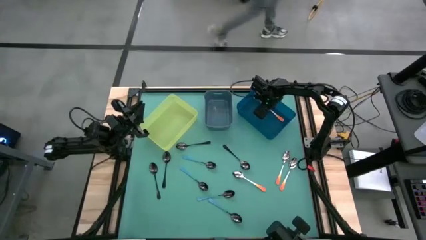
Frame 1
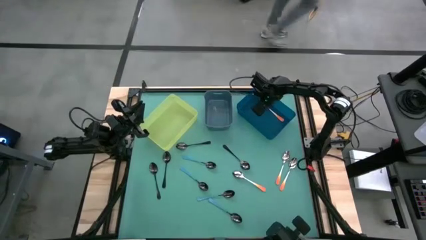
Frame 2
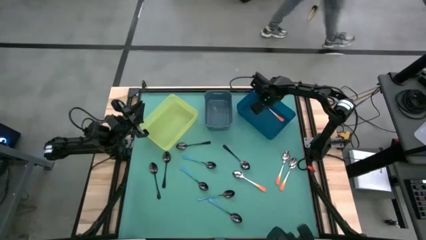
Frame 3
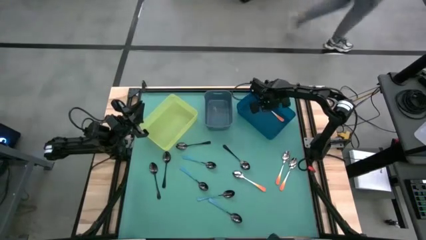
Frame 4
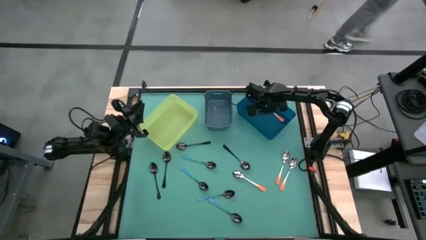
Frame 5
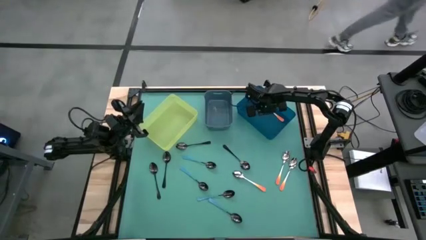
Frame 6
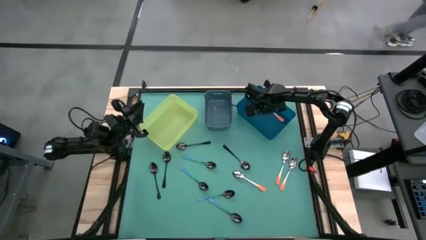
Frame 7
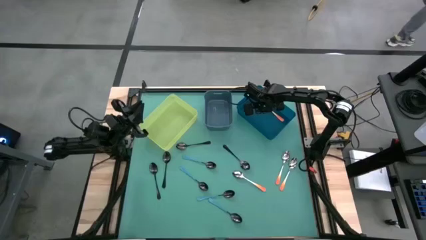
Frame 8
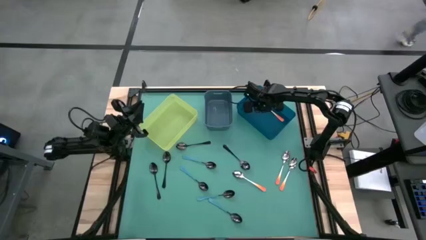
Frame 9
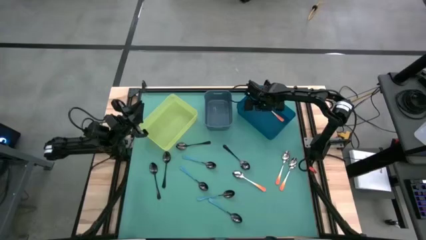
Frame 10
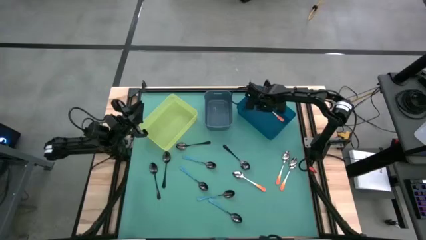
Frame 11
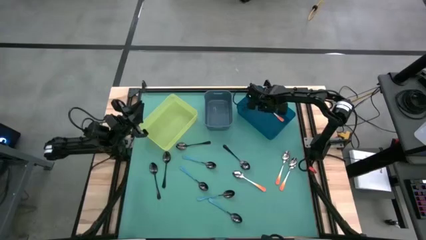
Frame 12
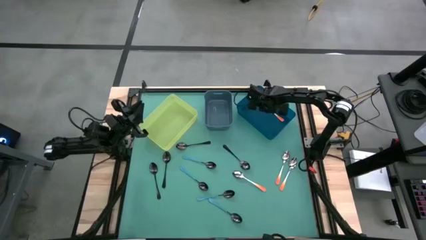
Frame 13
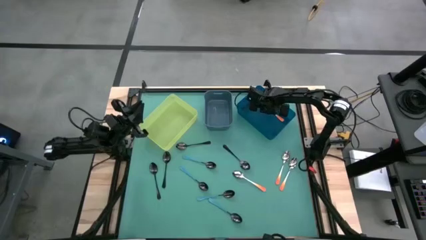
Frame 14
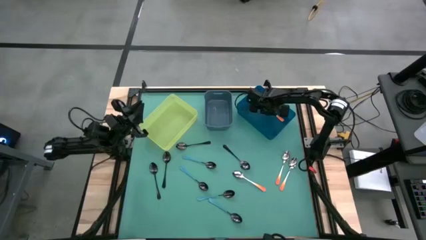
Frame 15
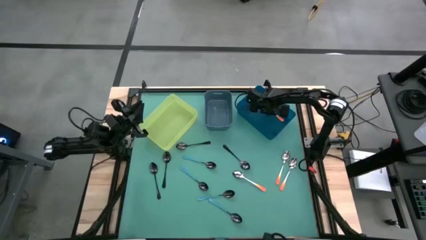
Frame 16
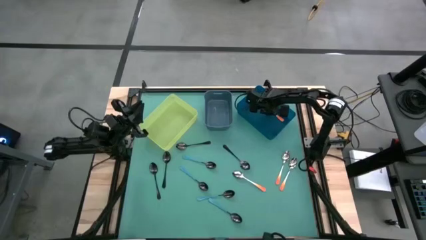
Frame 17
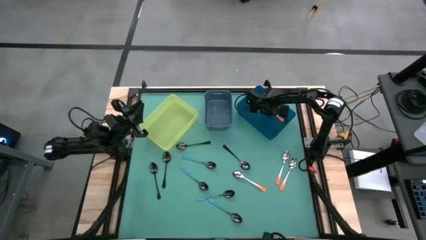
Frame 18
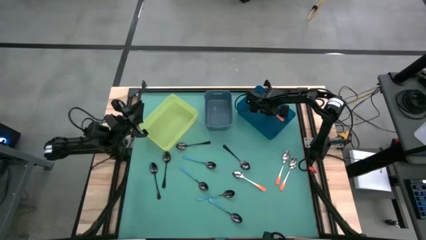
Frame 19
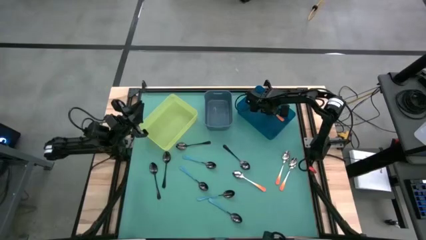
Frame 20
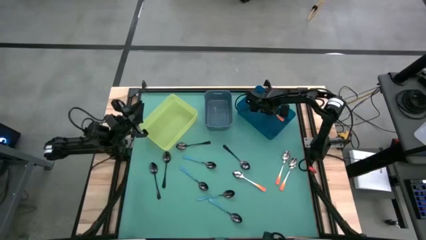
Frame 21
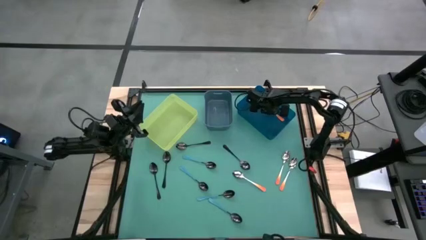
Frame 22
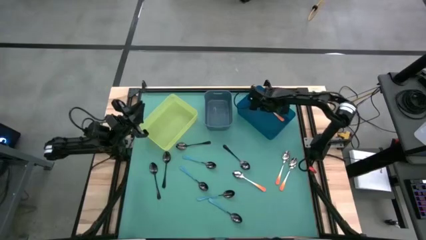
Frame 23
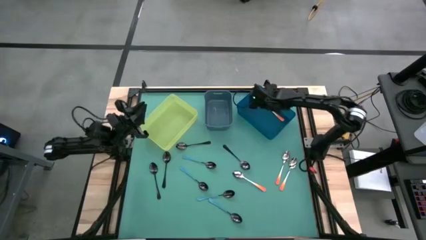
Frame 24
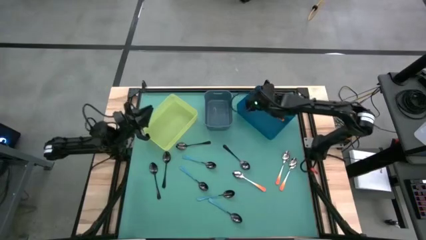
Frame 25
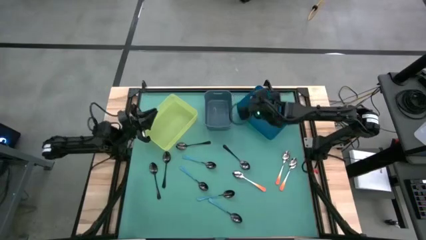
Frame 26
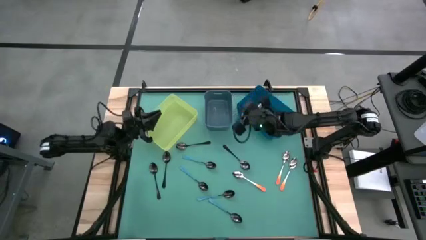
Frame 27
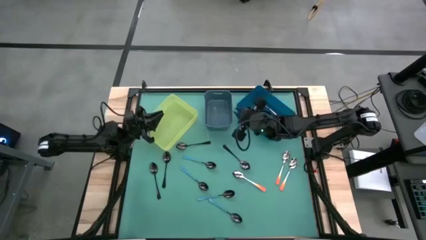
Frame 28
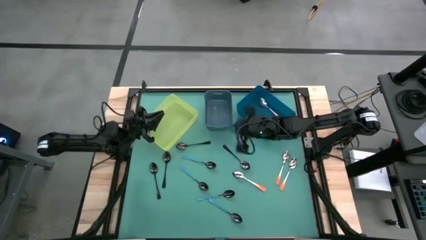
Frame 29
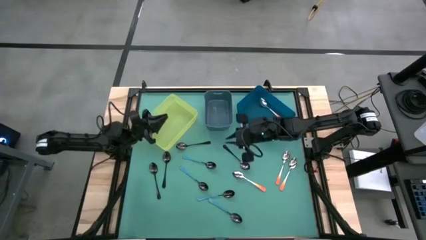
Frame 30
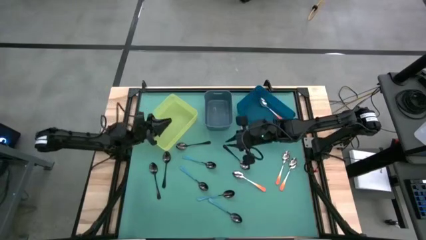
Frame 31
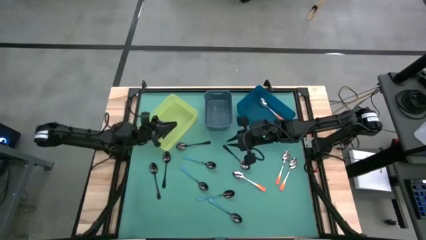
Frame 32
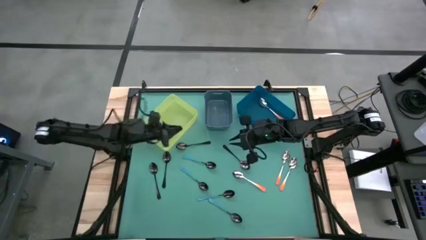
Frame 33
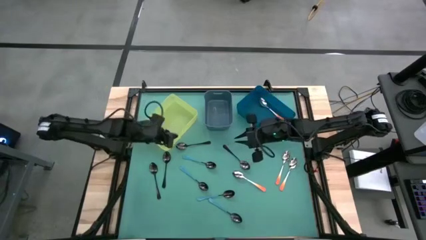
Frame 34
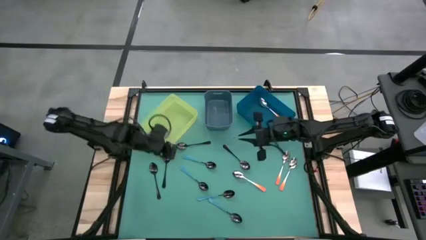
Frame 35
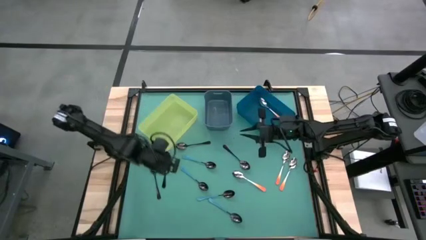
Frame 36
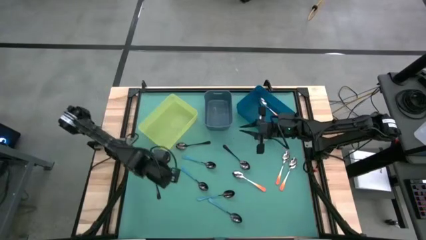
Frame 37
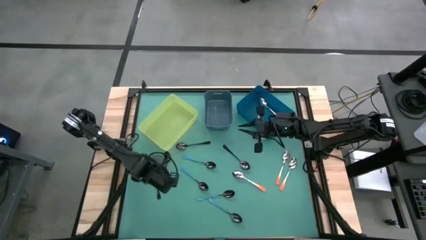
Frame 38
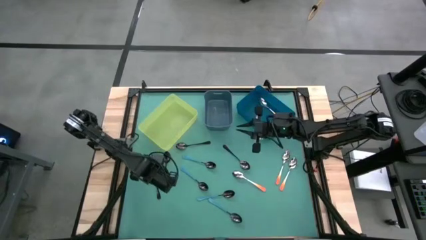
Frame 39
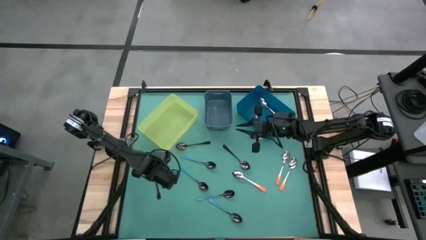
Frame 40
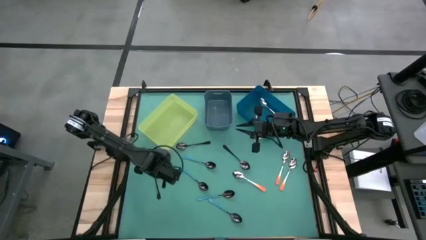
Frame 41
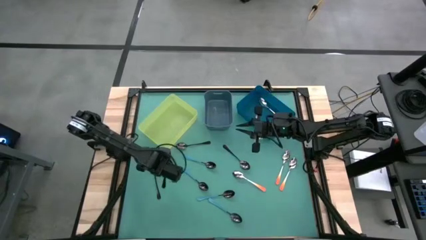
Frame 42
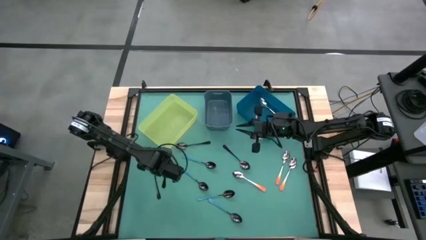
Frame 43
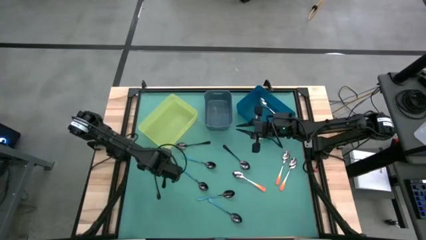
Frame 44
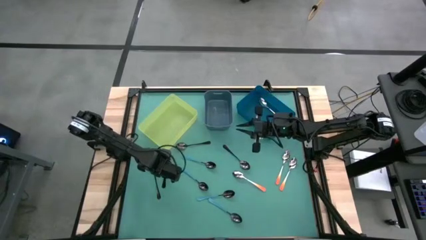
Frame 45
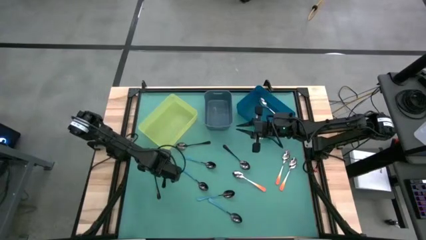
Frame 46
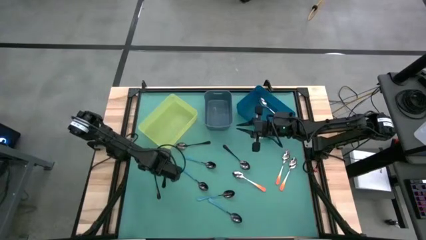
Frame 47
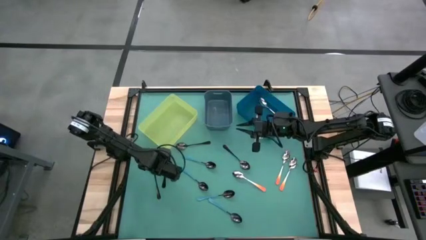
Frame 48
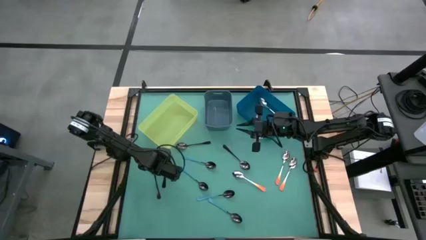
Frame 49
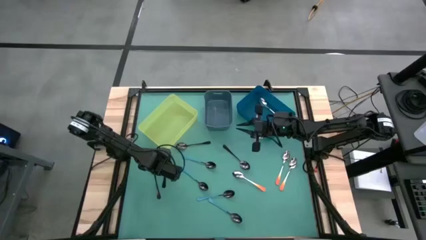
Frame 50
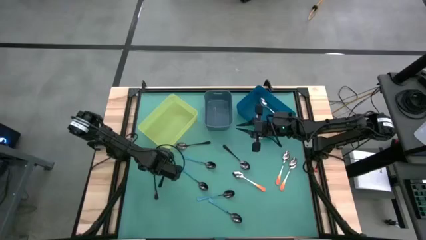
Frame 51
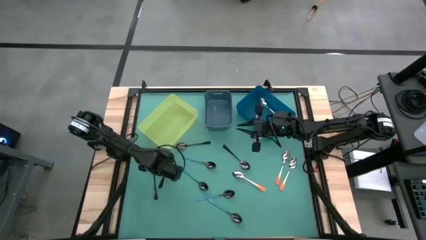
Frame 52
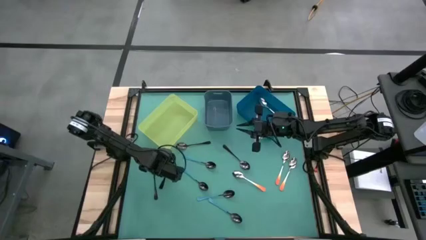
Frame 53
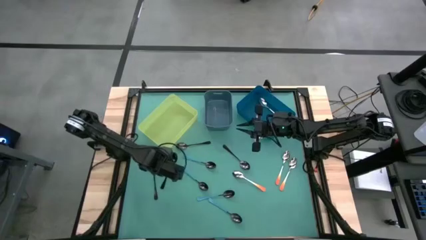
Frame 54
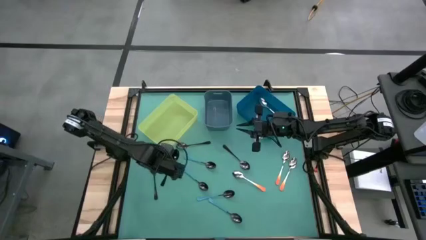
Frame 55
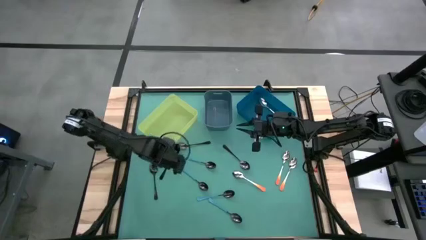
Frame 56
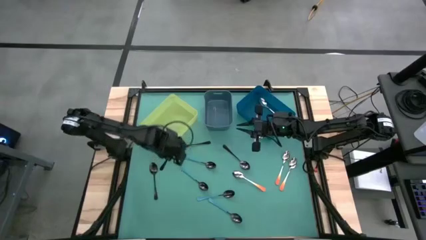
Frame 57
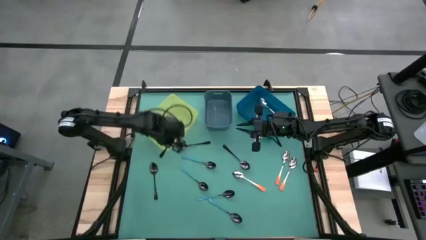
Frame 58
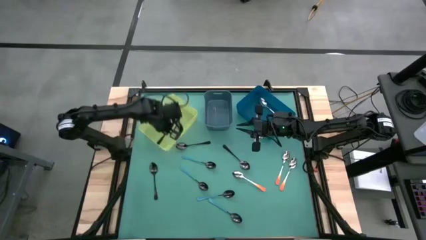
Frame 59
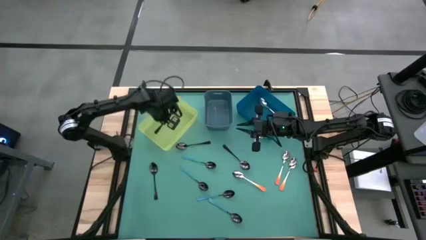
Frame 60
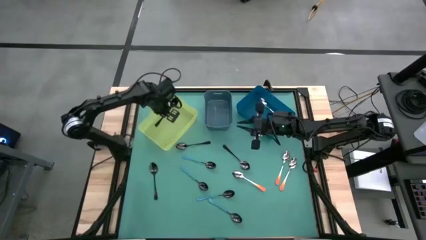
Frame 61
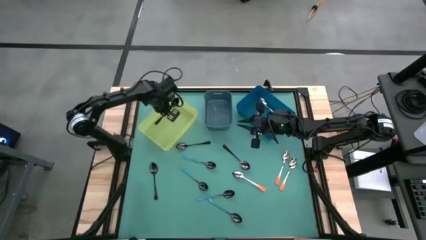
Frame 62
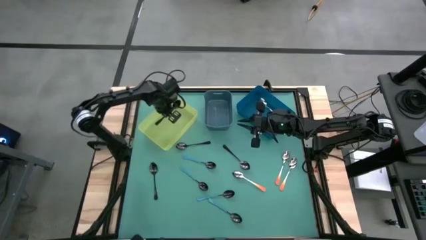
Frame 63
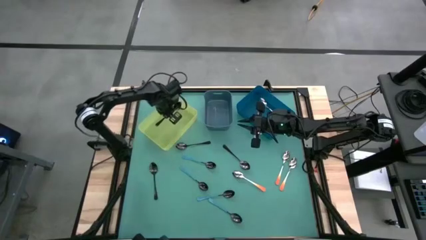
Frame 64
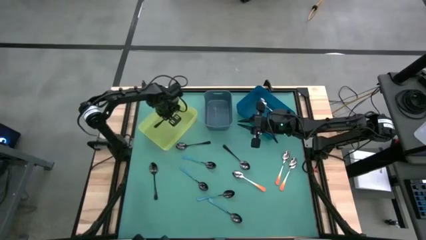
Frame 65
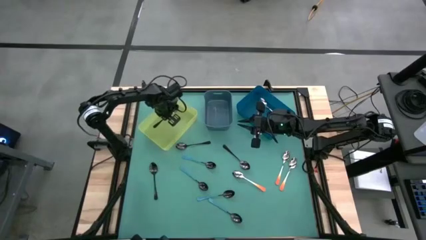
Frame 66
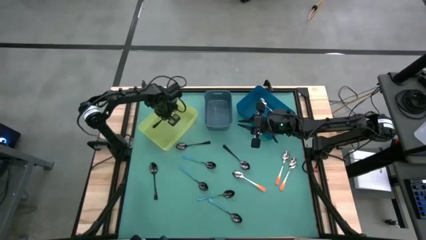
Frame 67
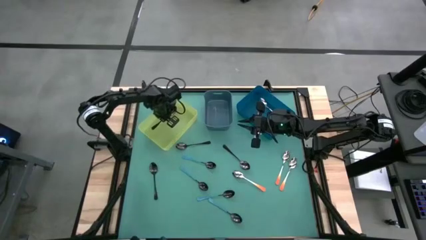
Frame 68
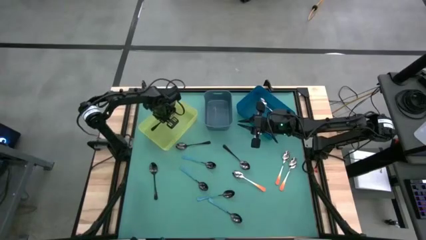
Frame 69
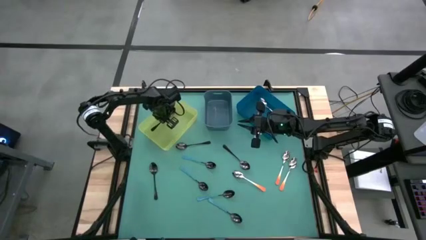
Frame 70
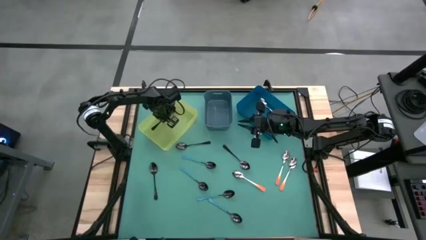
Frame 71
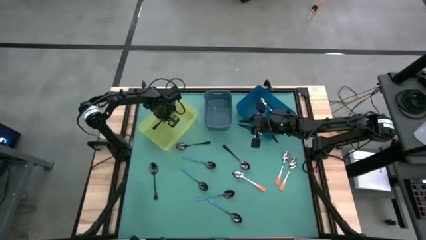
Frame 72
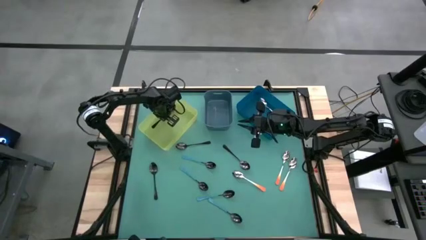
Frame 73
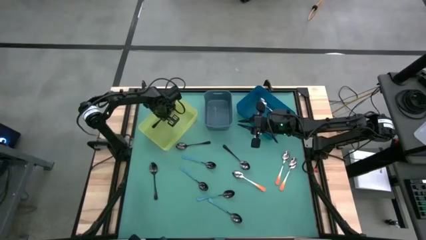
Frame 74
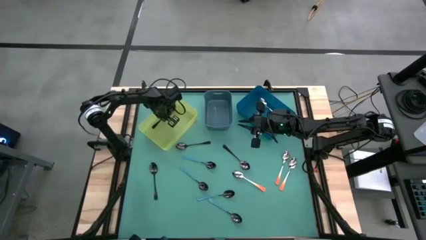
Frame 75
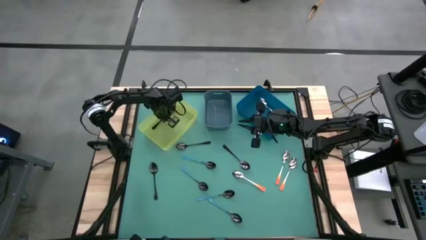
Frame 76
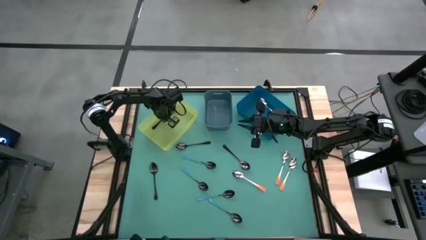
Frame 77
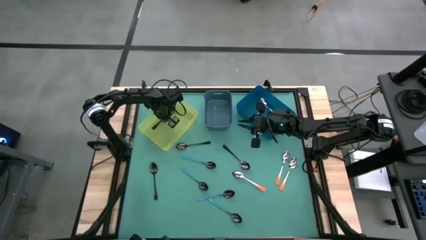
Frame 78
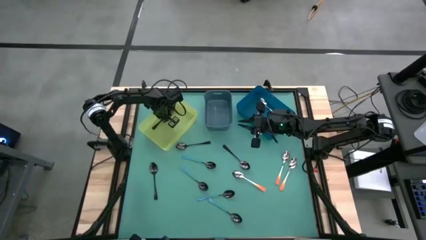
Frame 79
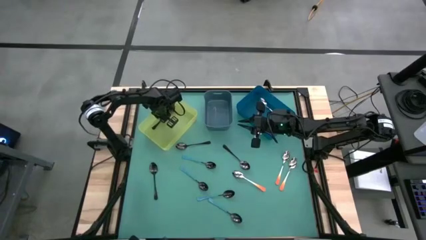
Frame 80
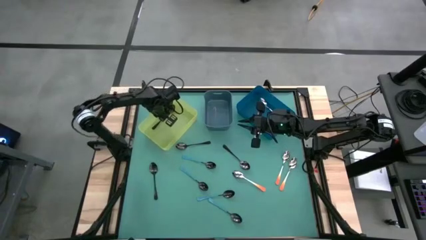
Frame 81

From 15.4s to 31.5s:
Task: Sort silverware by color (type)
Put the black spoon into the yellow bin
